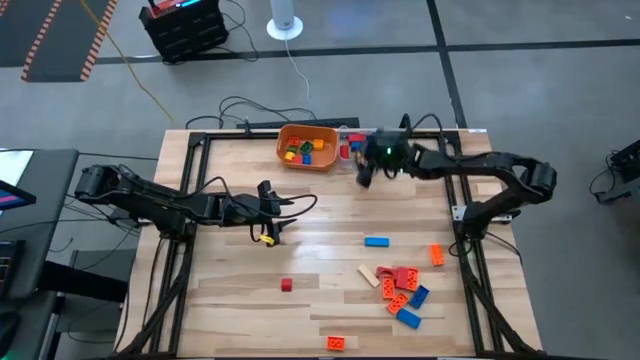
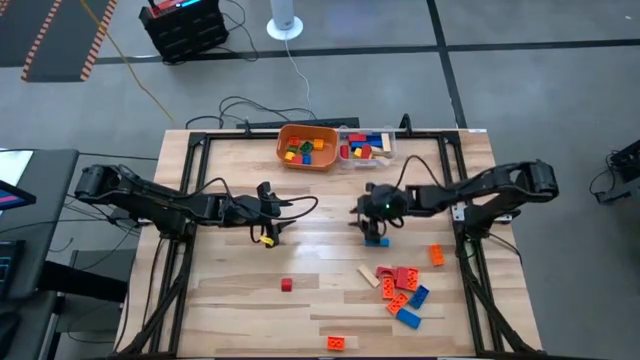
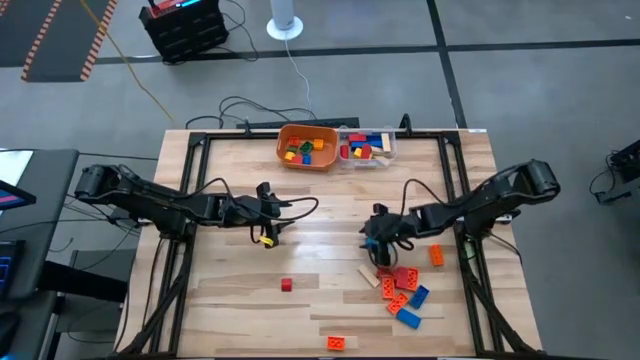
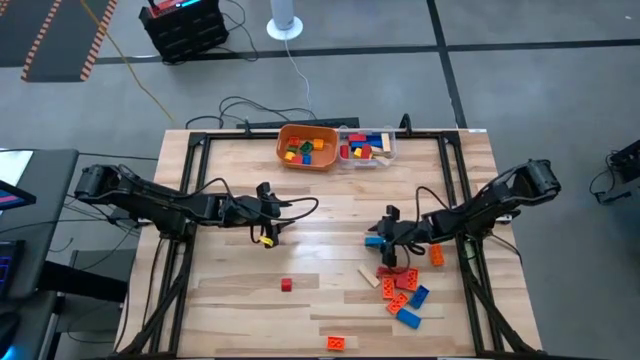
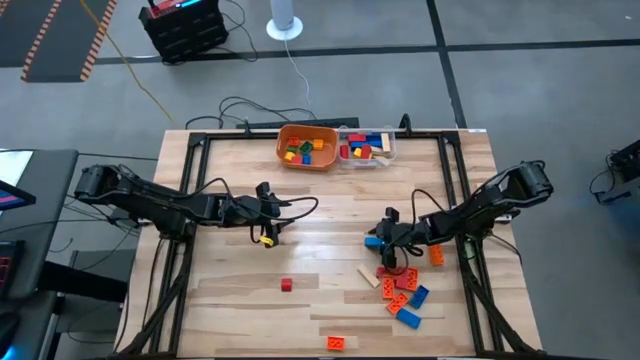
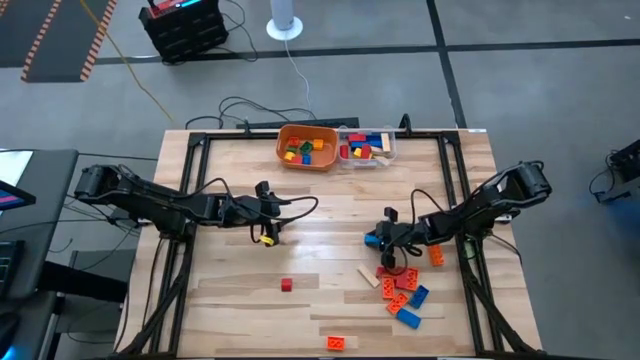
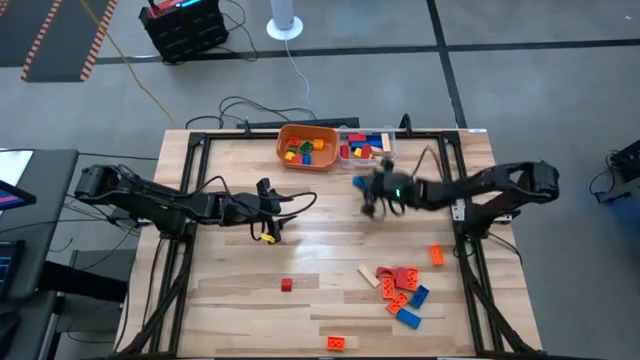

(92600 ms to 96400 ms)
Task: Sort blocks by size
Put the top blue block into the transparent bin

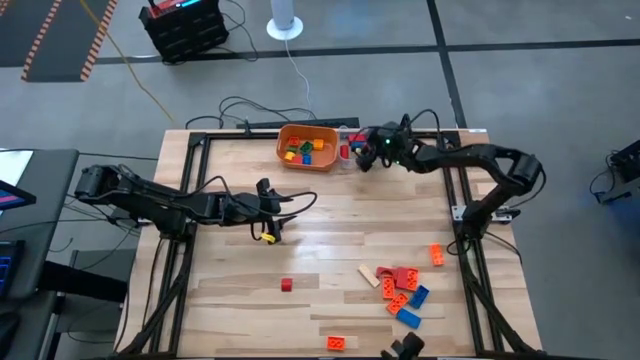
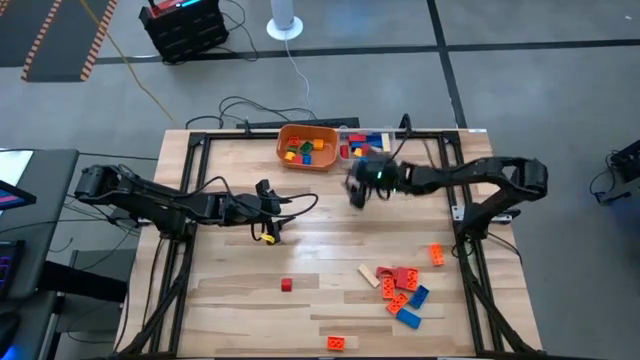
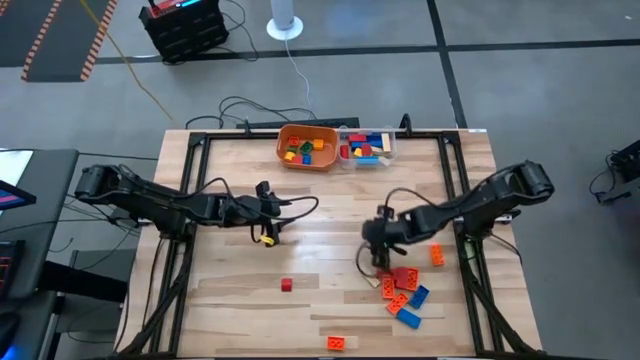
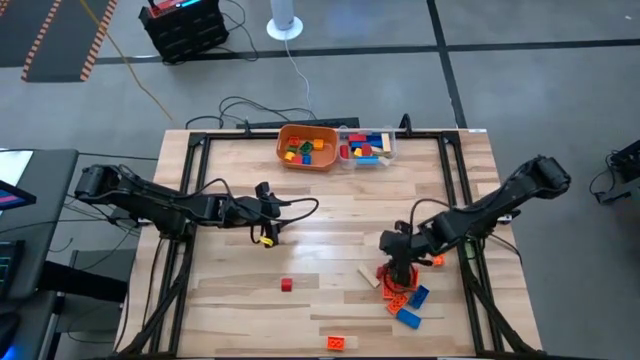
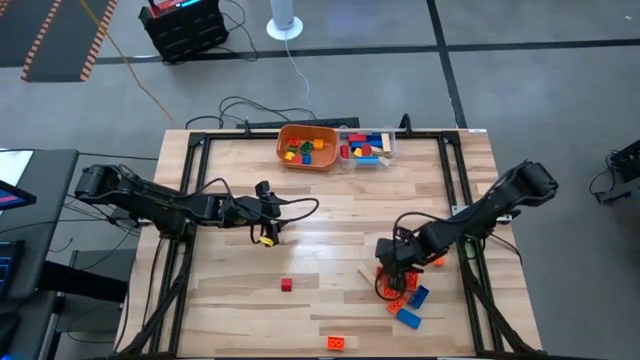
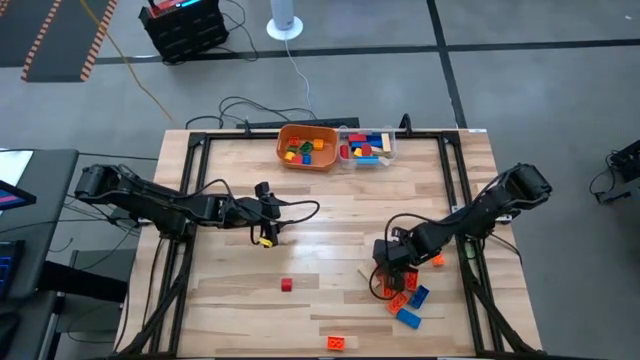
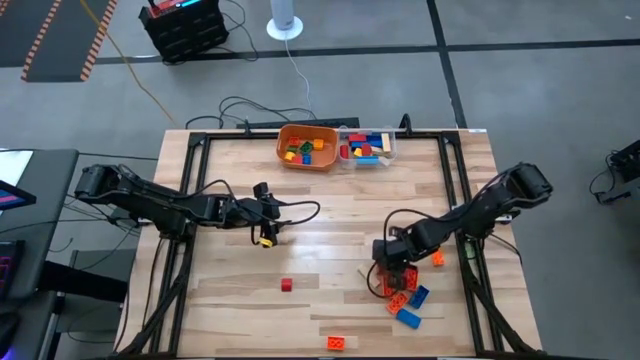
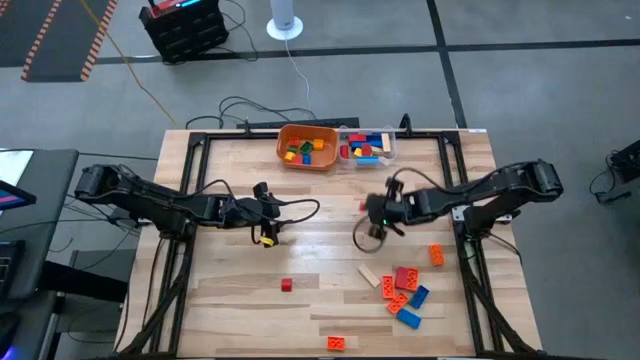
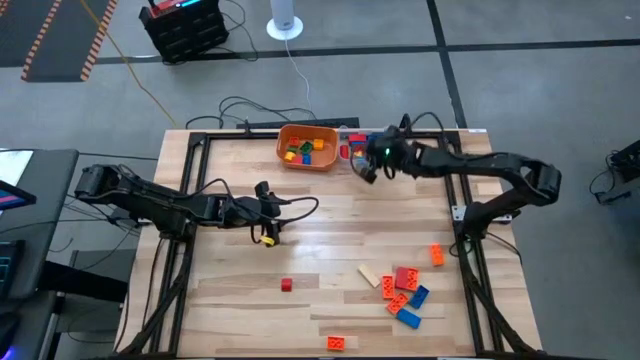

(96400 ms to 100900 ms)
Put the red l-shape block into the transparent bin

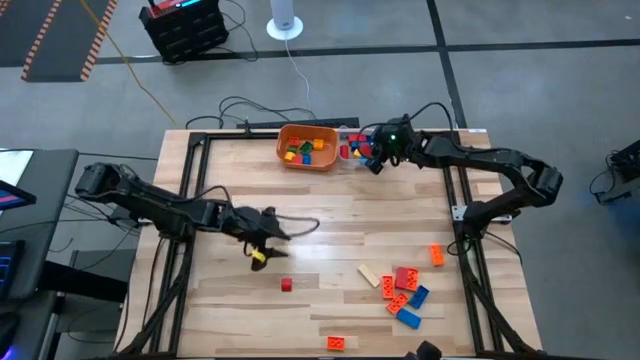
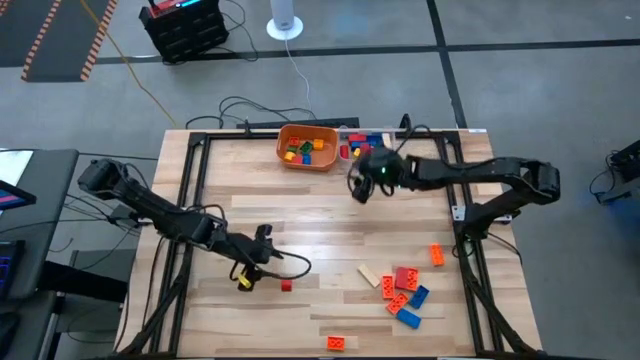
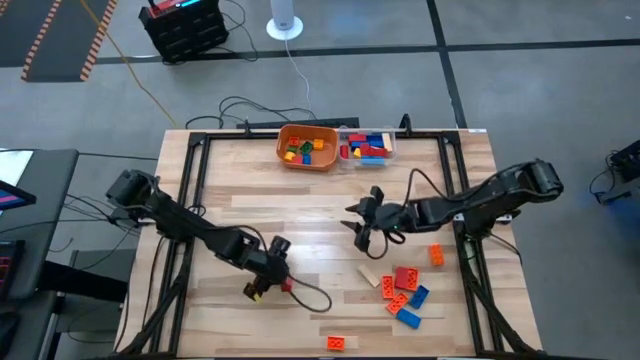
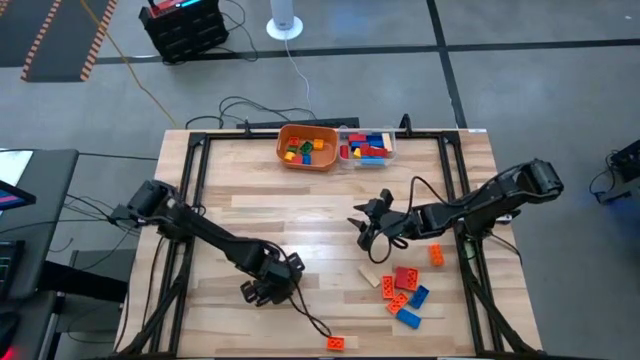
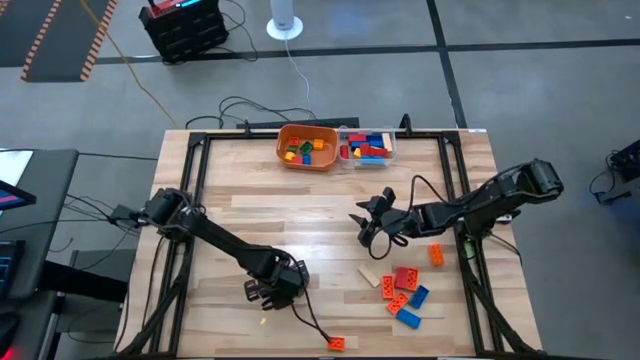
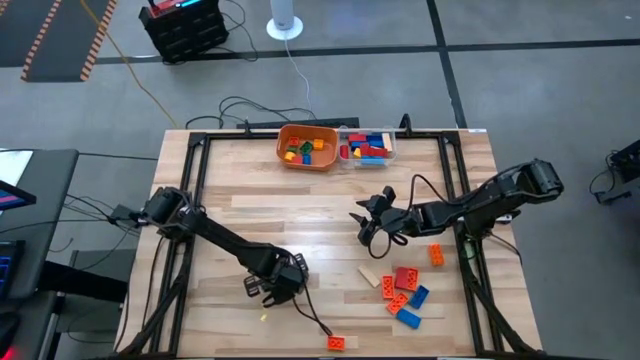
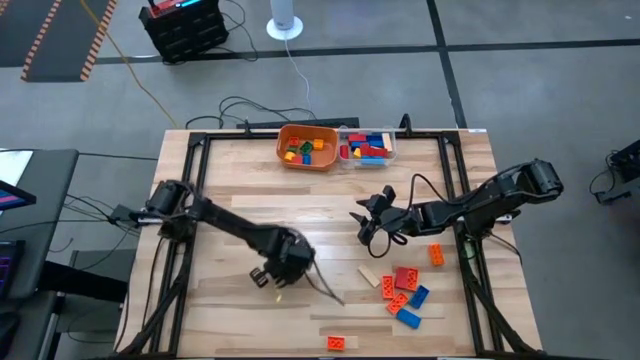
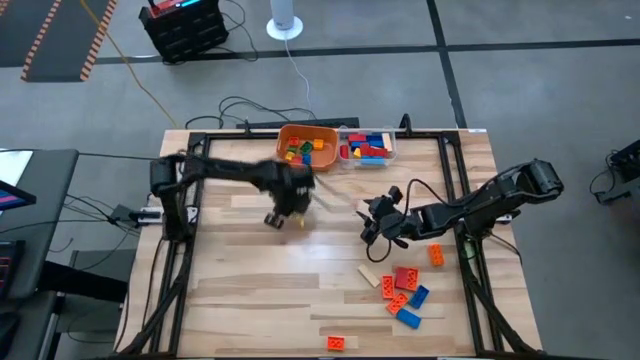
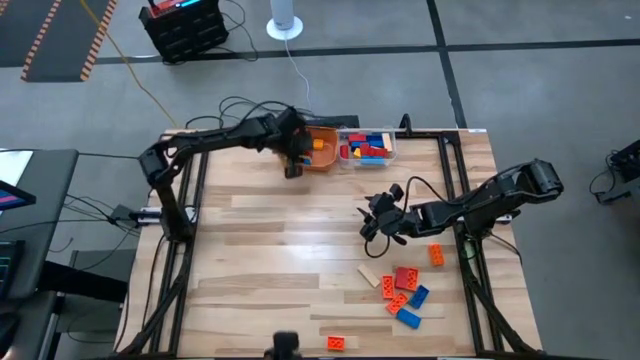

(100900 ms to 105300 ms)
Put the small red block into the orange bin

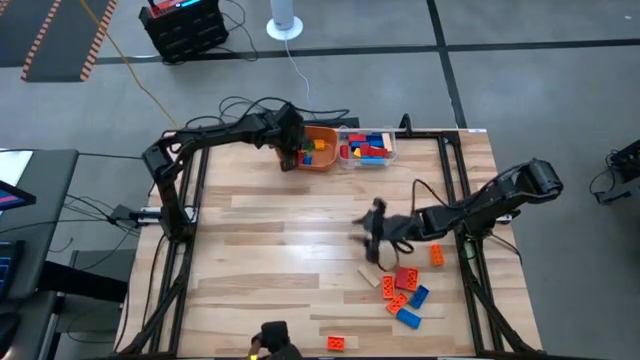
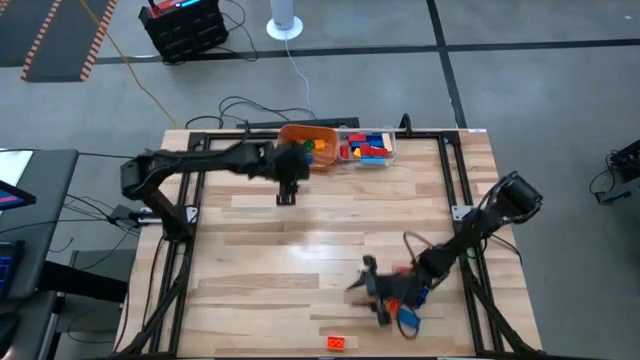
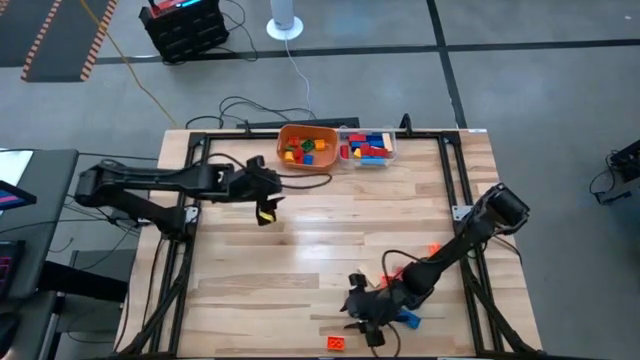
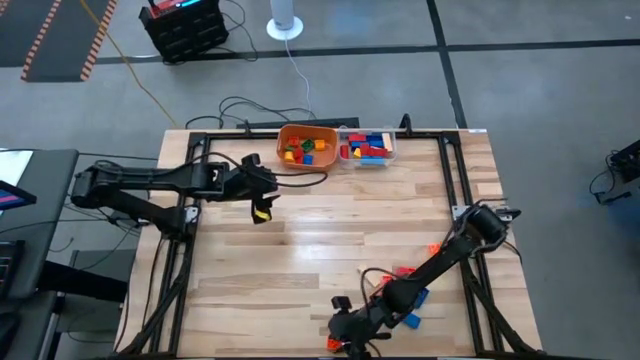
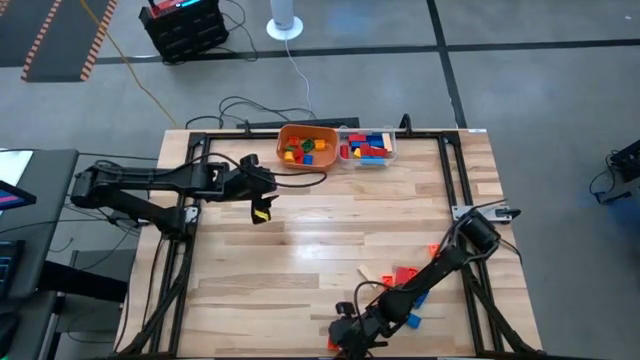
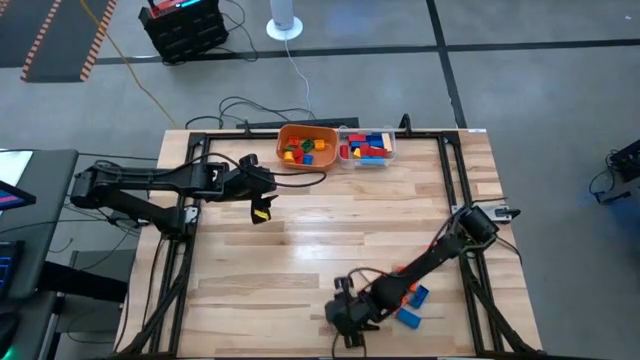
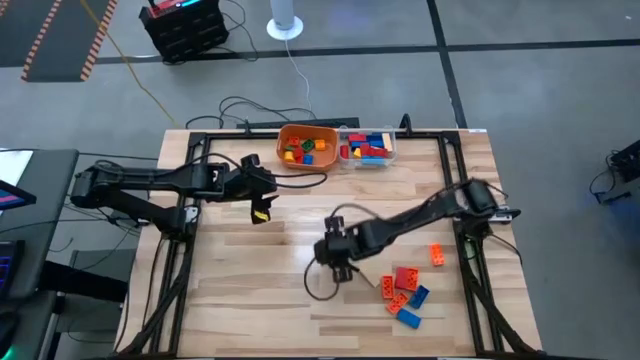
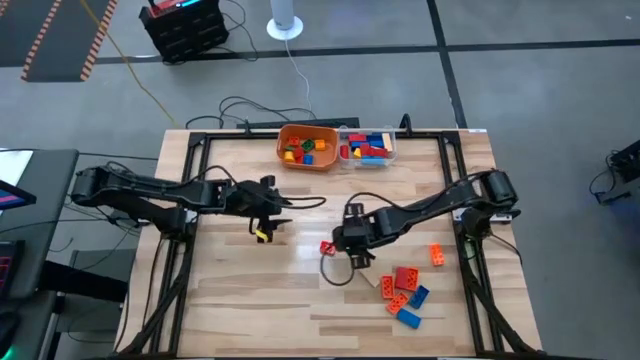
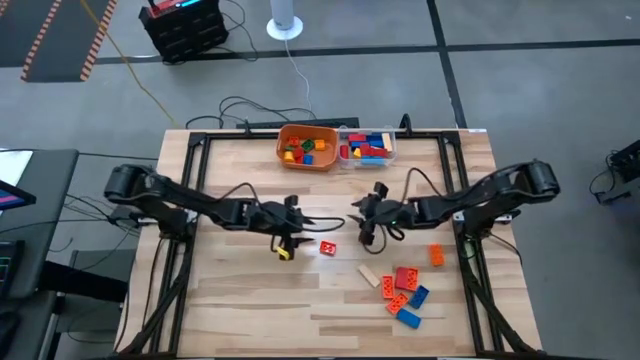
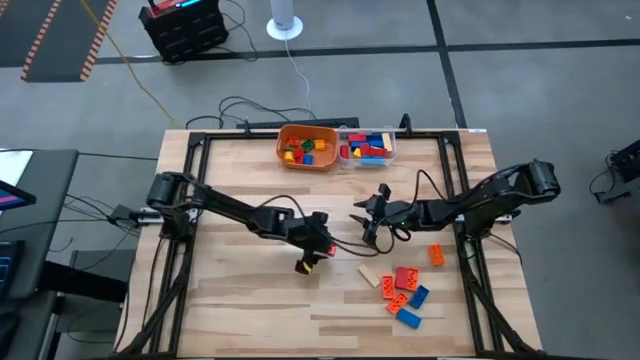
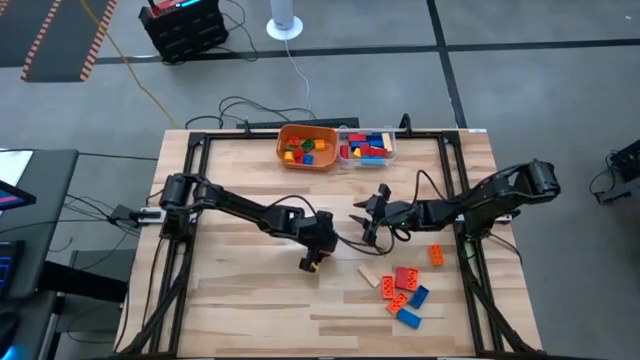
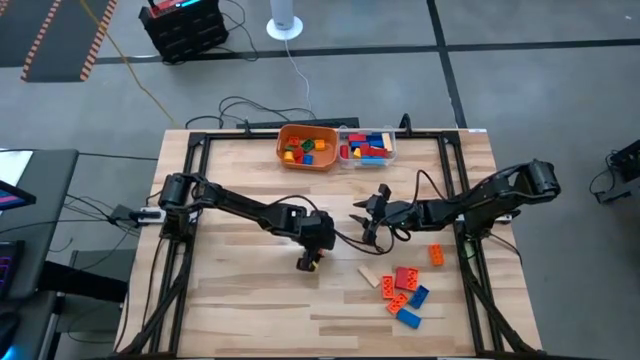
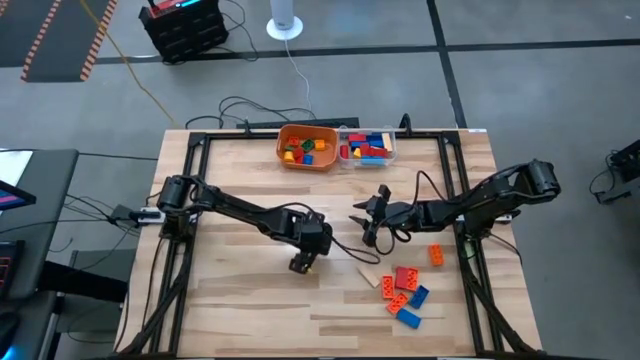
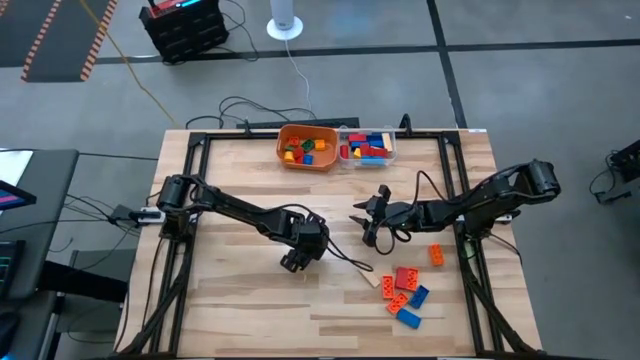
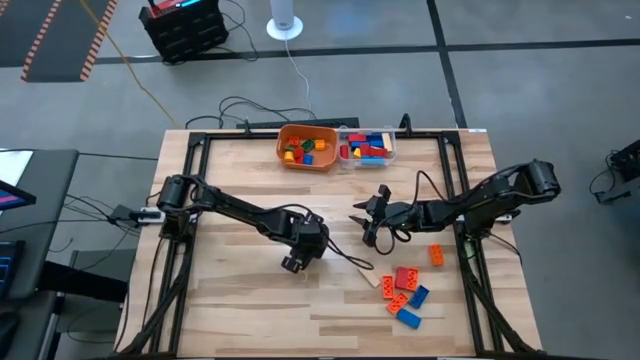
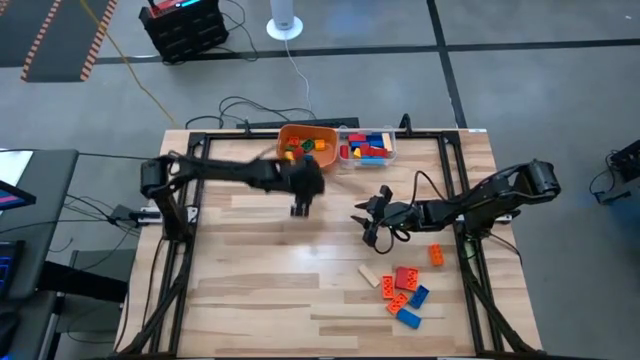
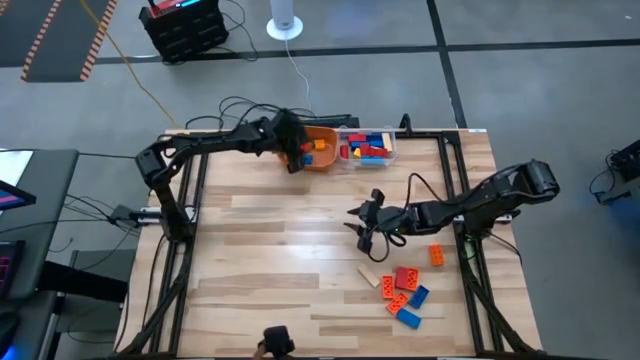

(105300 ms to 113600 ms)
Put the small orange game piece into the orange bin

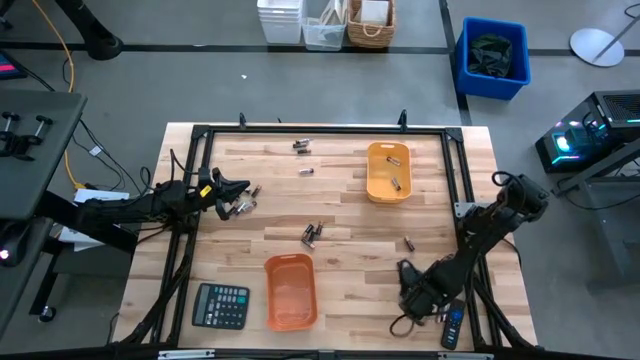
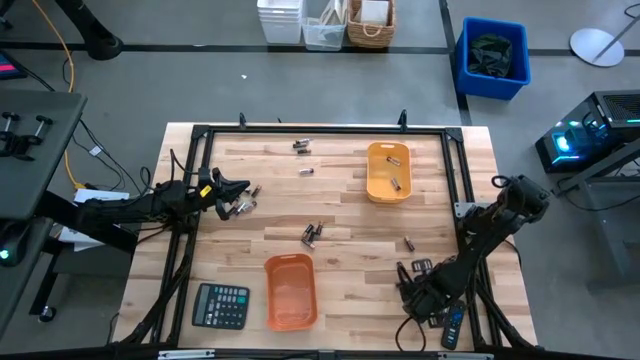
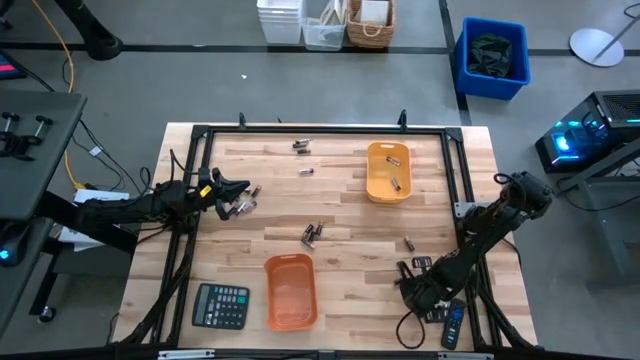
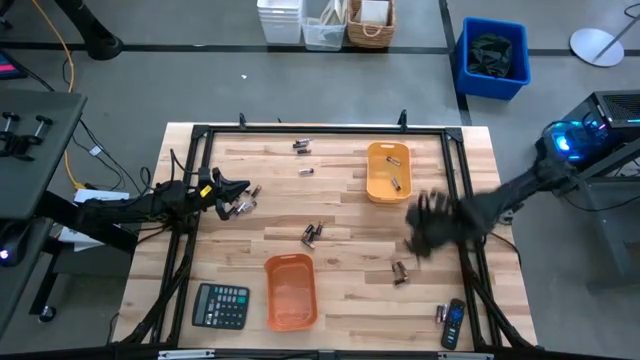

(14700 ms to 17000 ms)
Task: Sort batteries
Put the silver battery into the yellow bin
